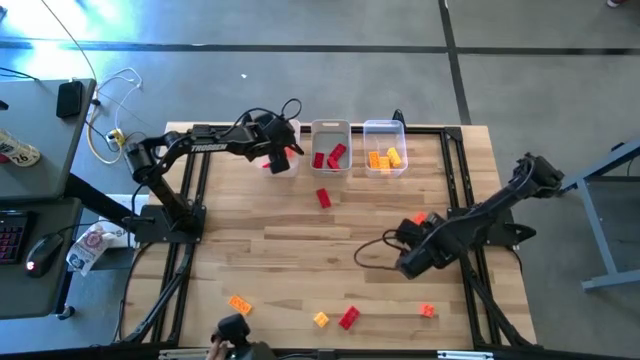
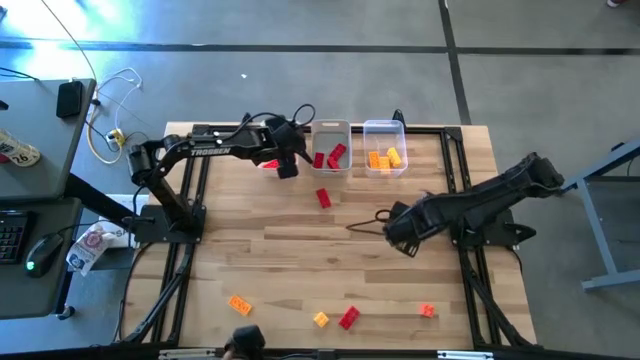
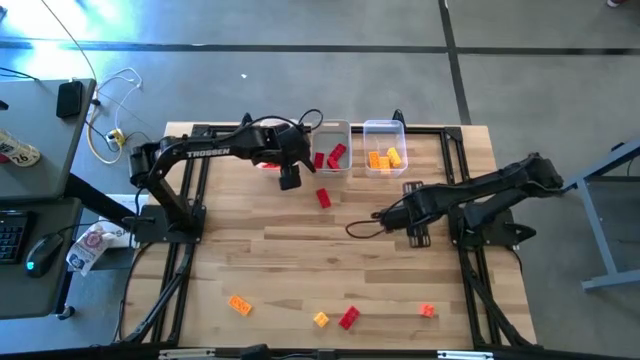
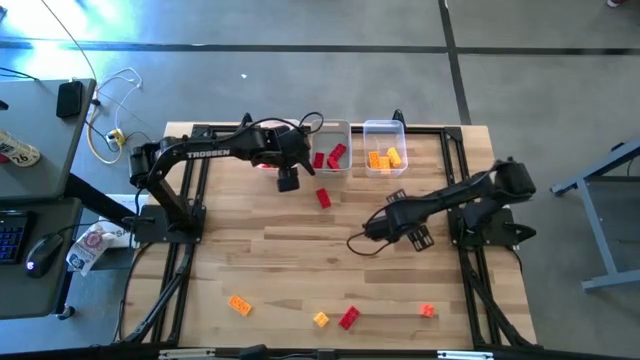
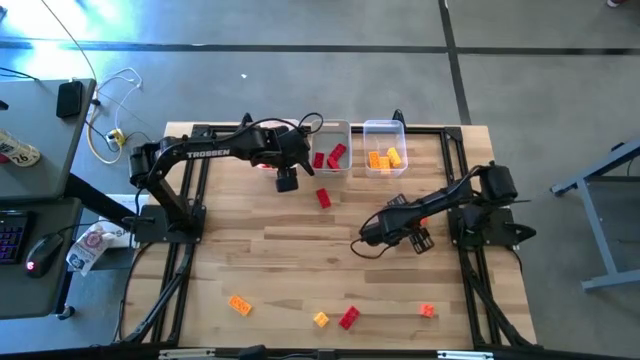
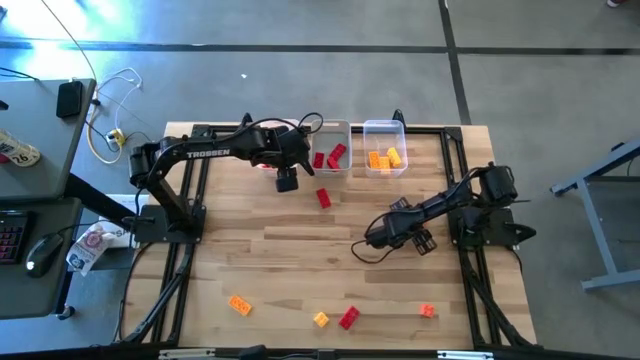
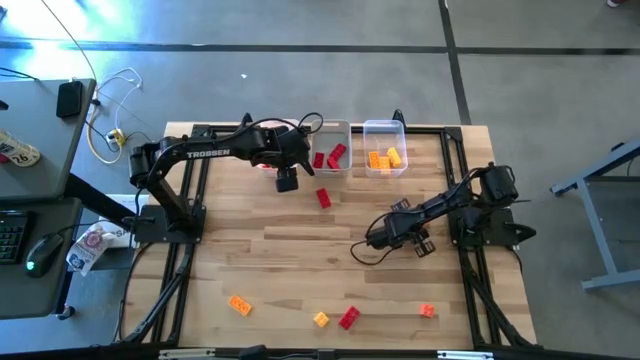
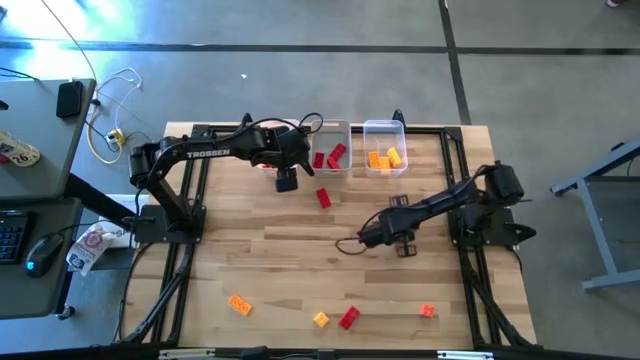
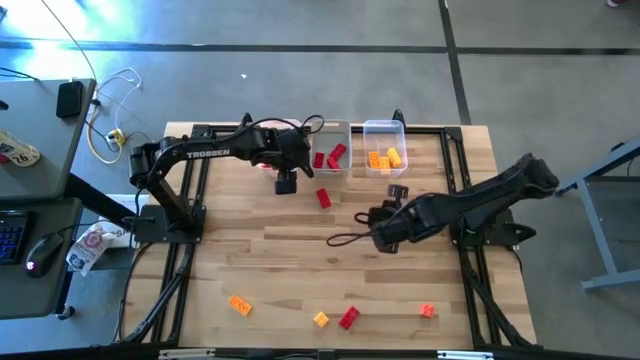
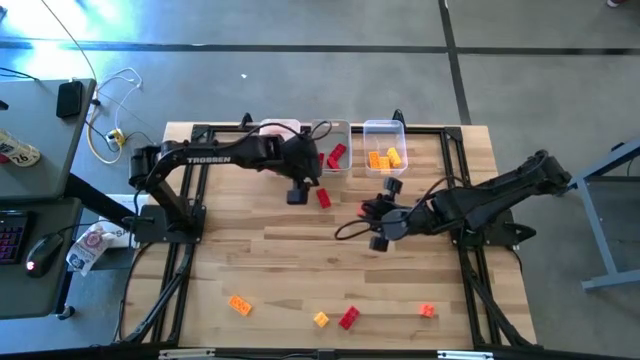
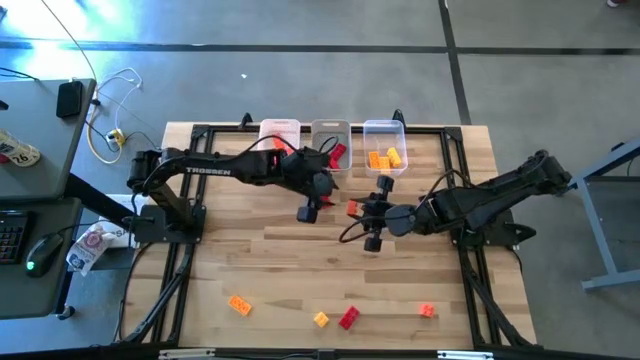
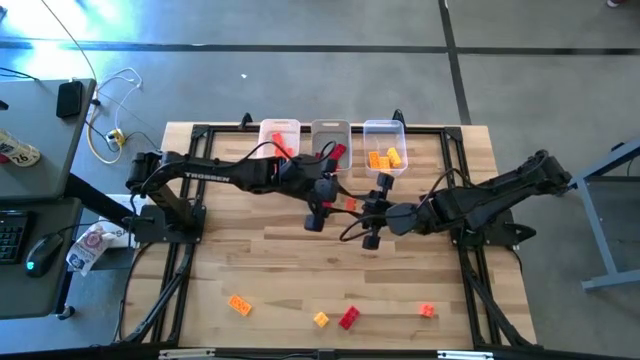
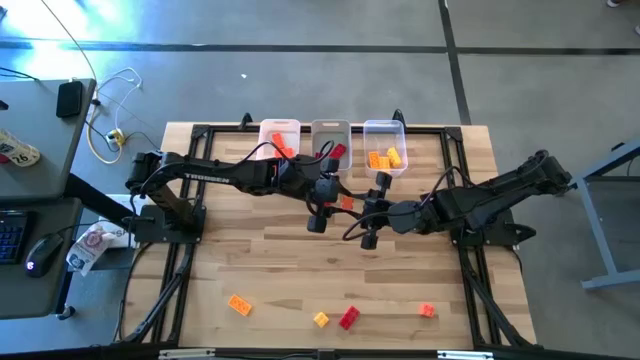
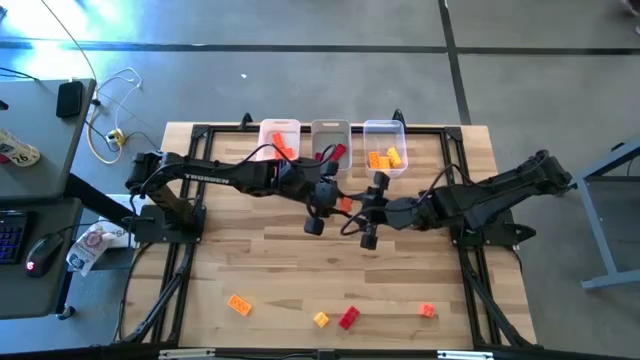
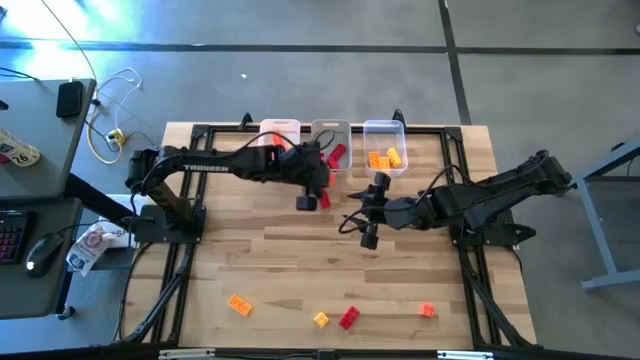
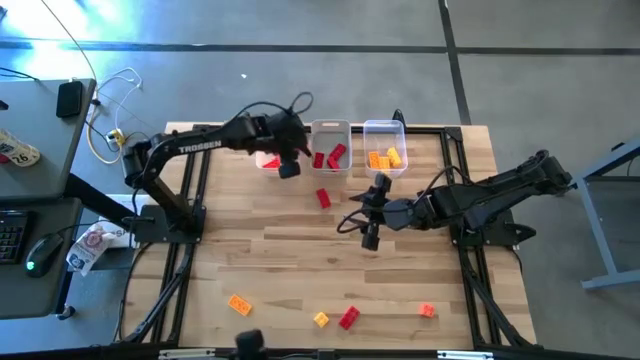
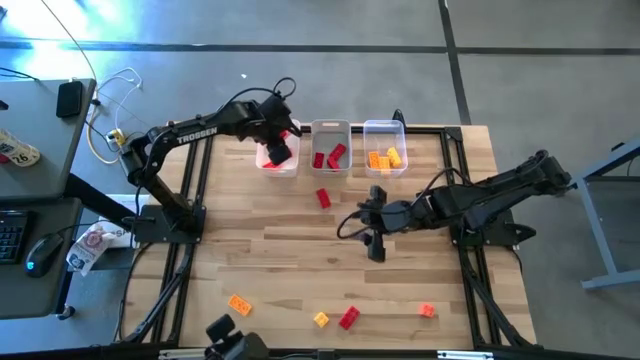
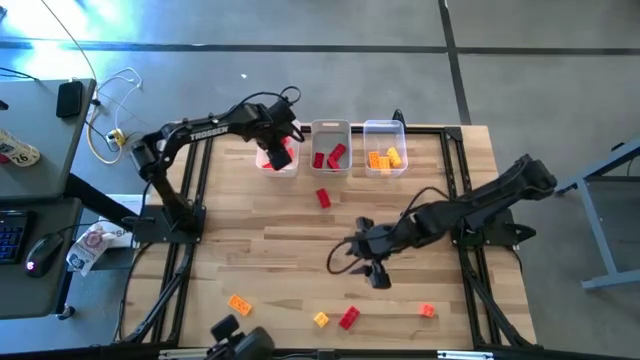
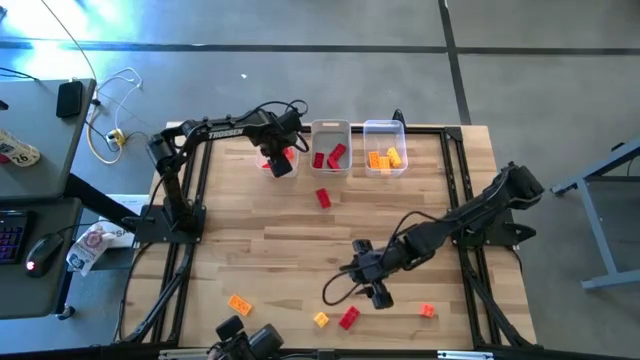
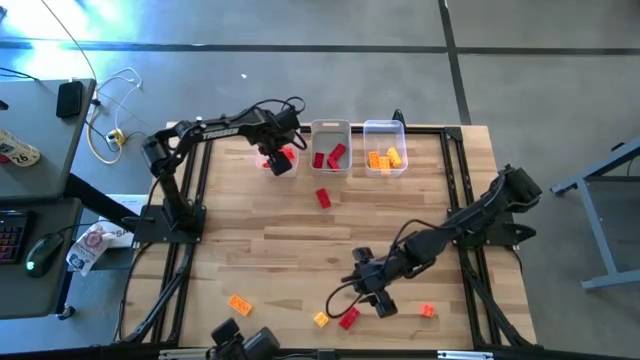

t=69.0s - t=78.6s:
Task: Sort & place blocks by color
Put the orange game piece into the white bin

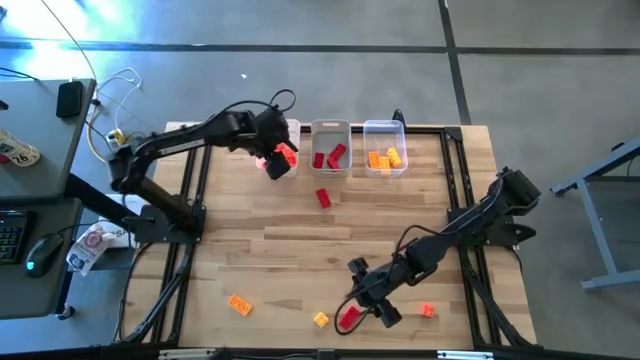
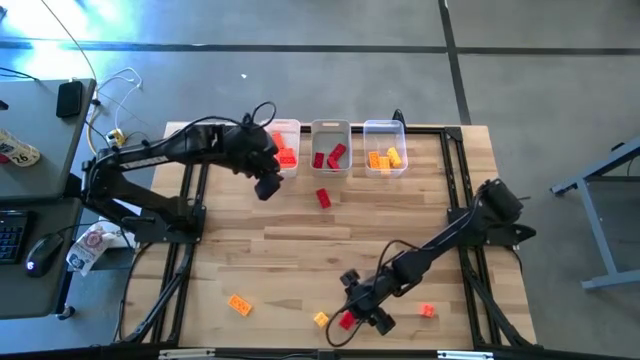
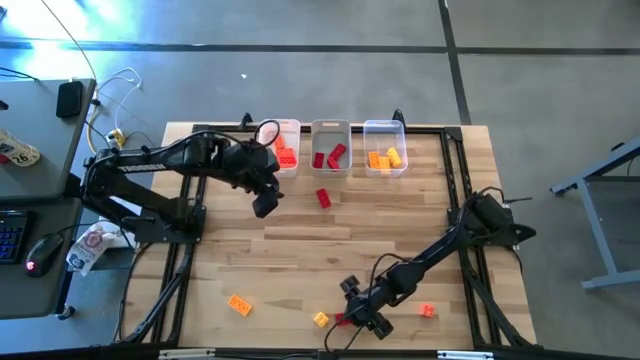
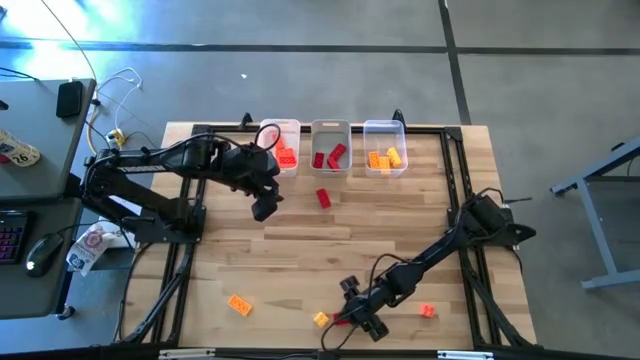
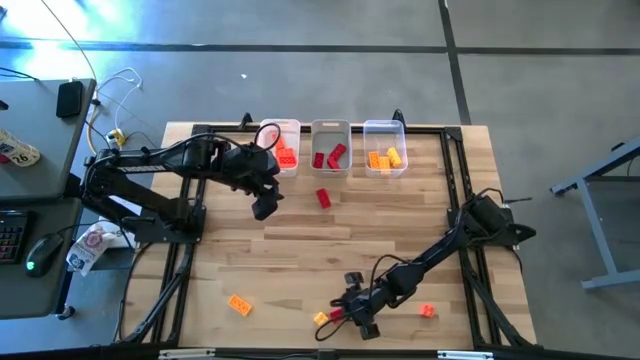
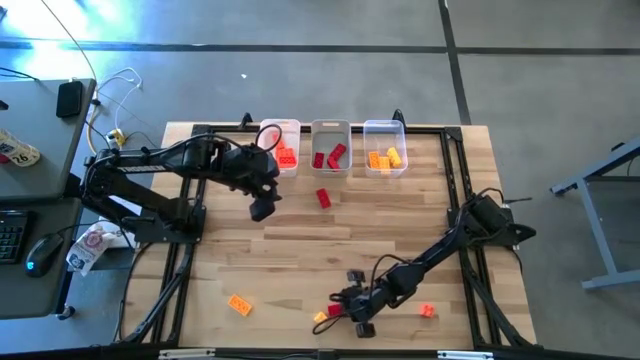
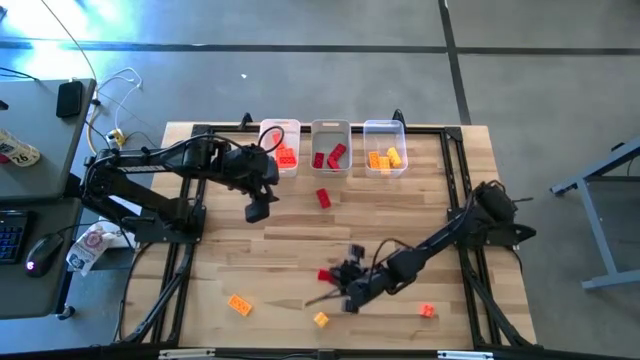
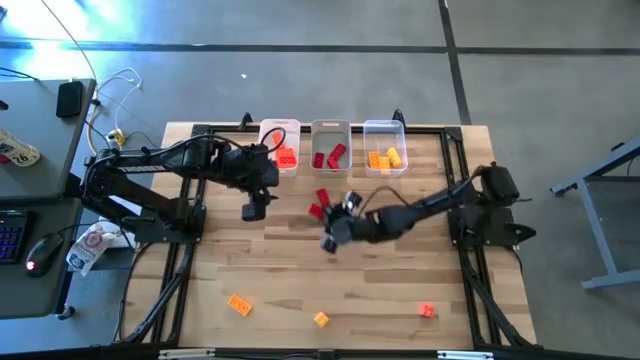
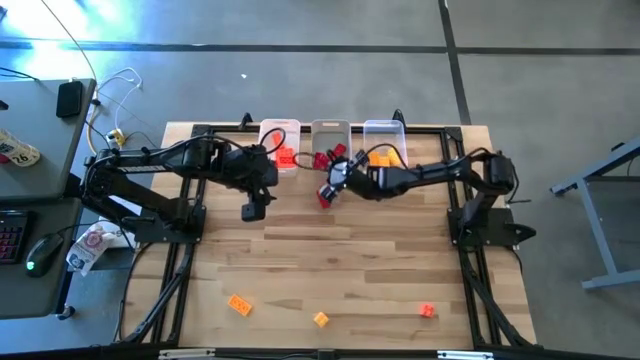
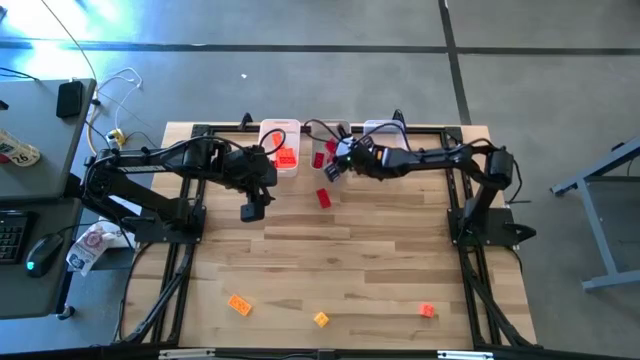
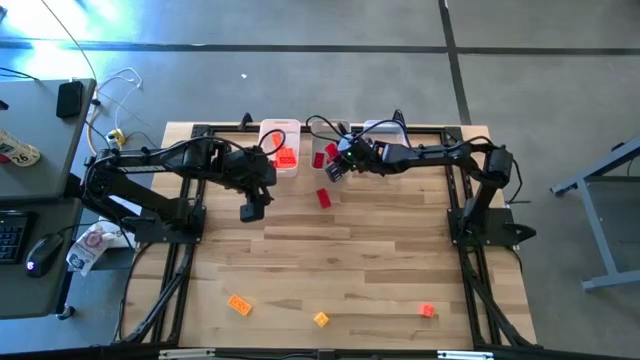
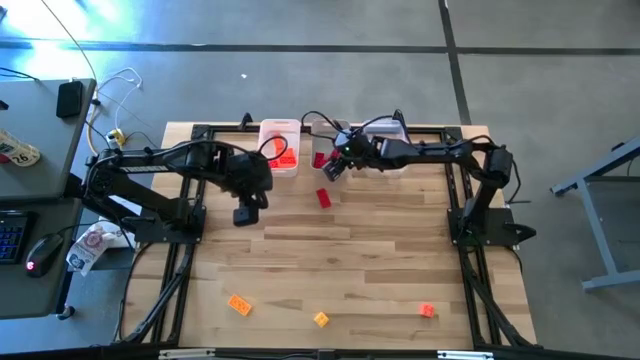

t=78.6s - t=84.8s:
Put the red game piece into the gray bin

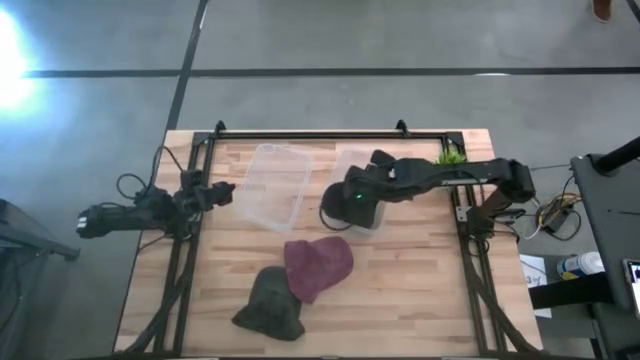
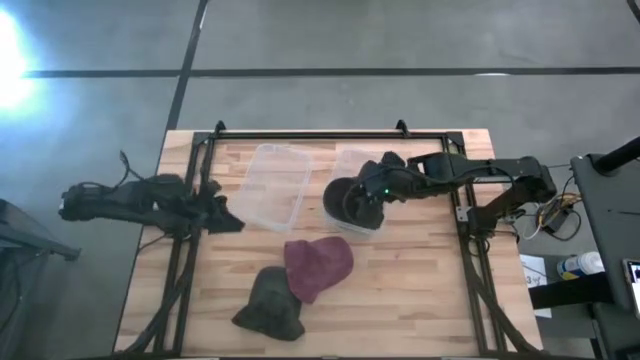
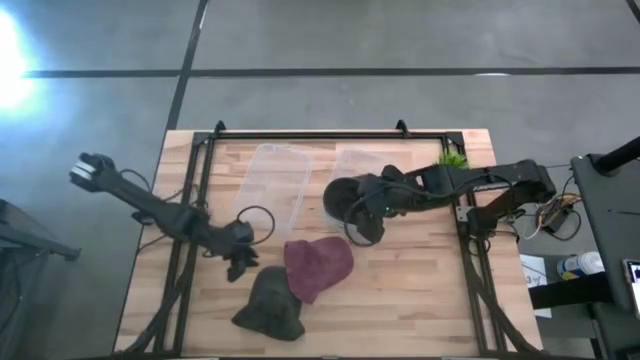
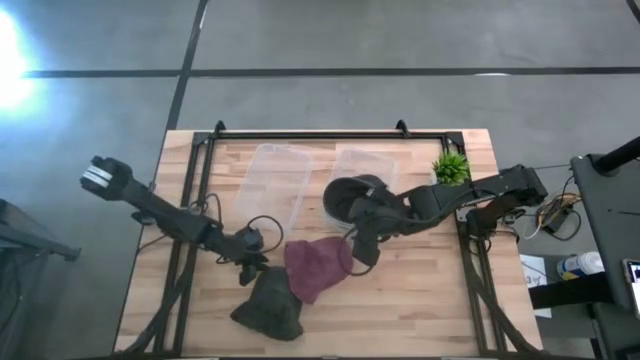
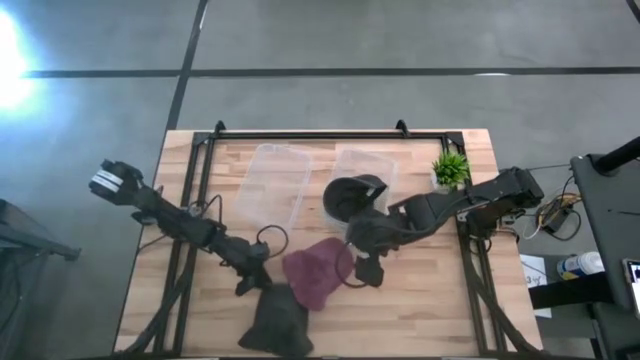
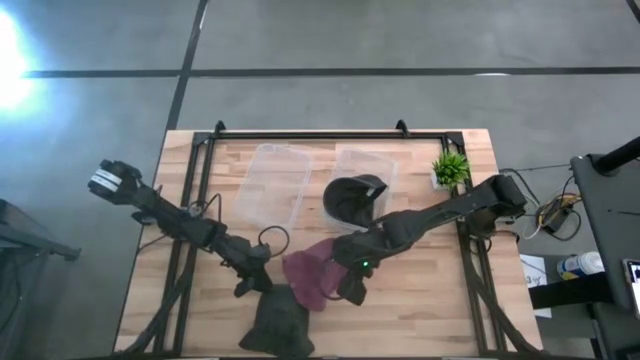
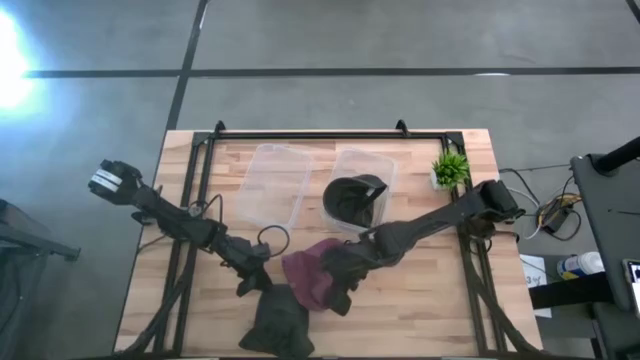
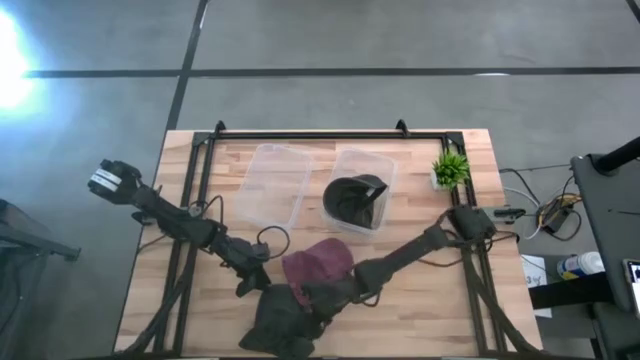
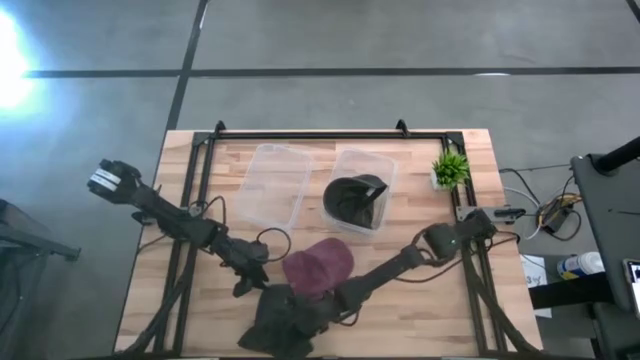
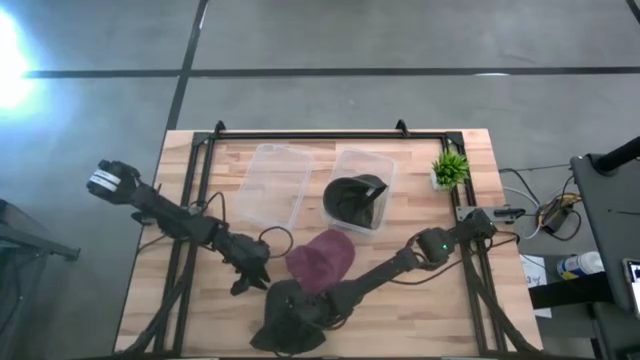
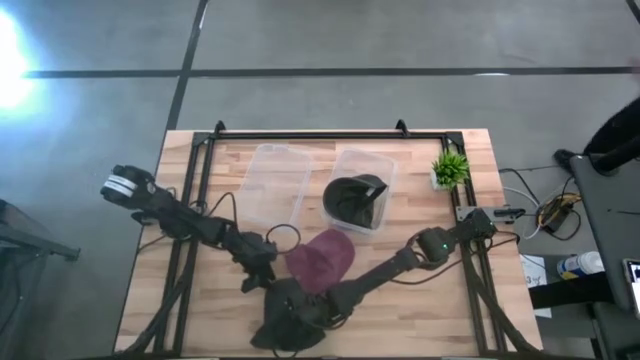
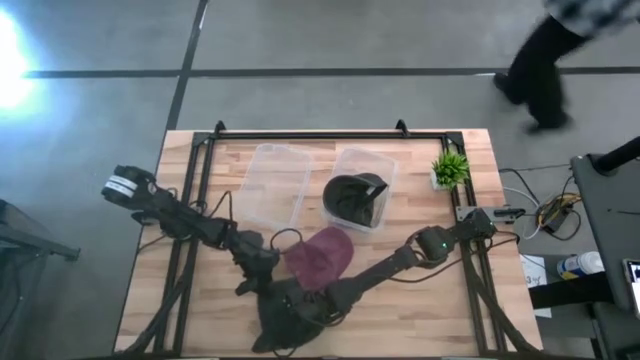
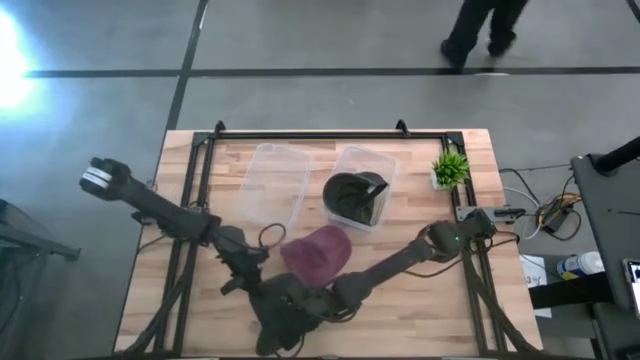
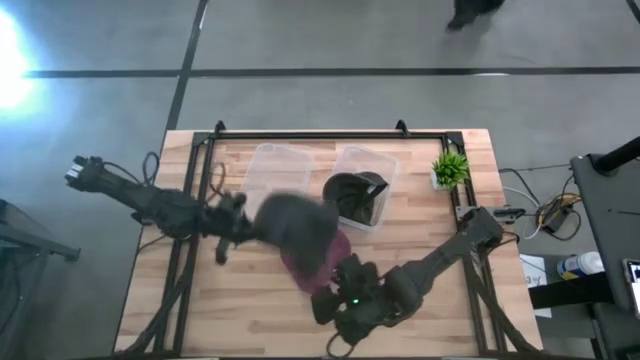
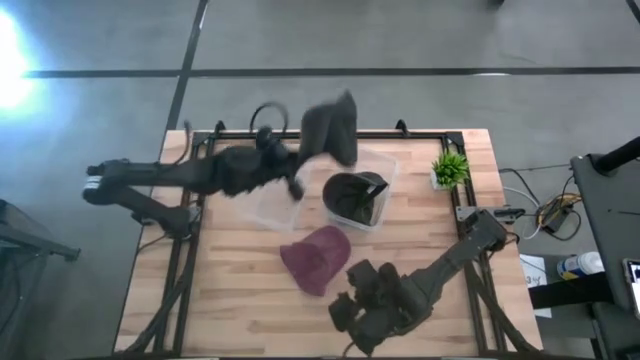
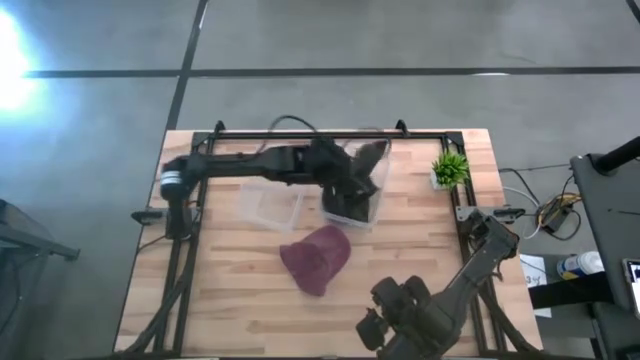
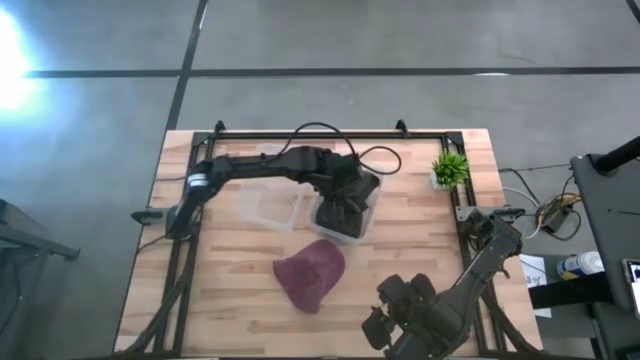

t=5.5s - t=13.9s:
Task: Pick & Place hat
Put the black cap into the right transparent bin
